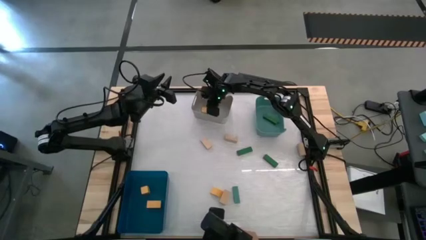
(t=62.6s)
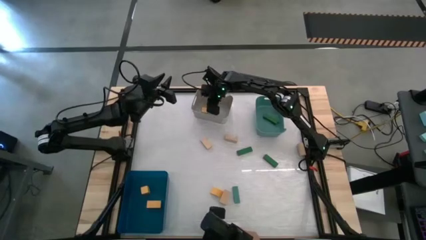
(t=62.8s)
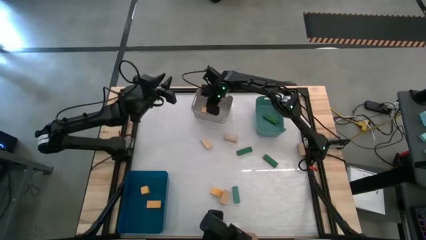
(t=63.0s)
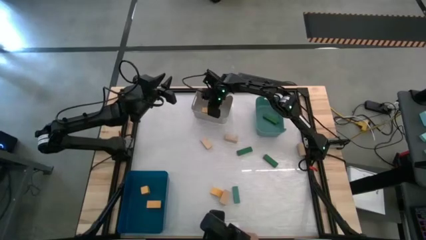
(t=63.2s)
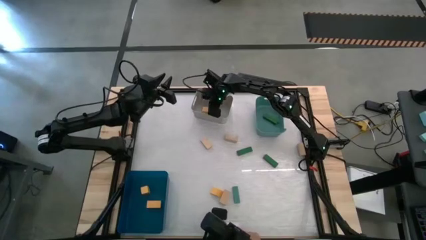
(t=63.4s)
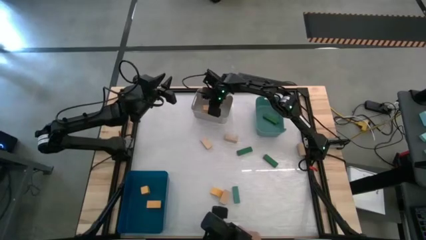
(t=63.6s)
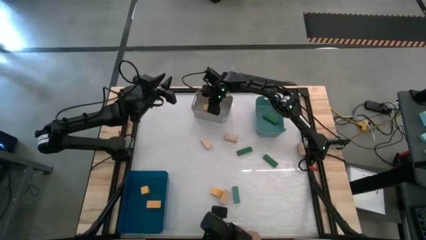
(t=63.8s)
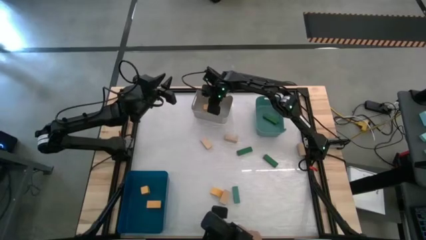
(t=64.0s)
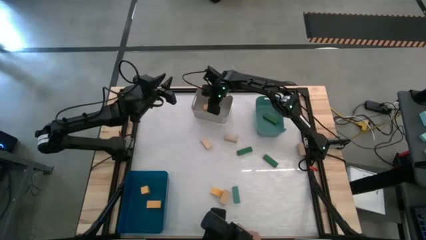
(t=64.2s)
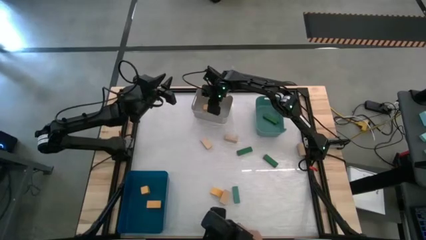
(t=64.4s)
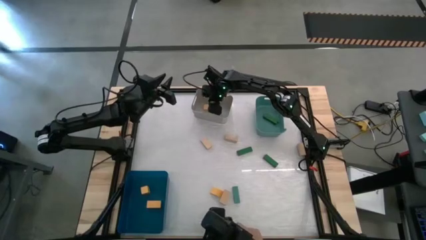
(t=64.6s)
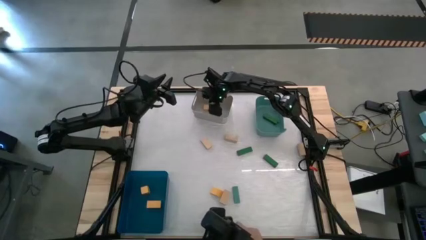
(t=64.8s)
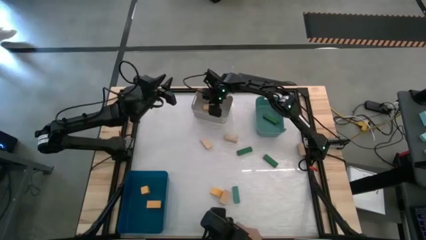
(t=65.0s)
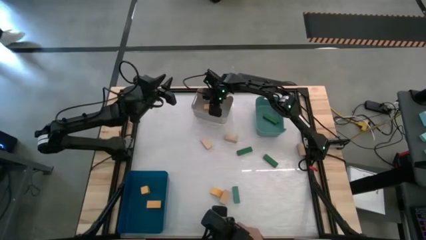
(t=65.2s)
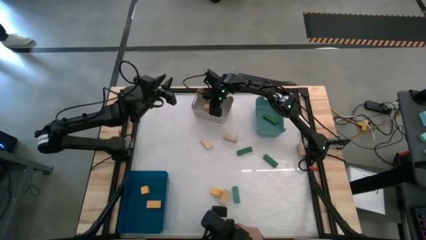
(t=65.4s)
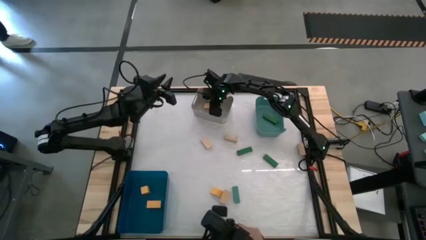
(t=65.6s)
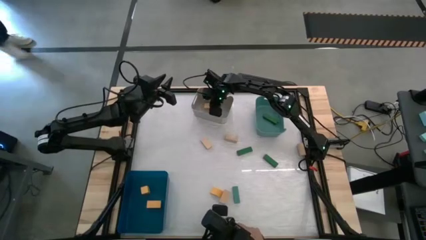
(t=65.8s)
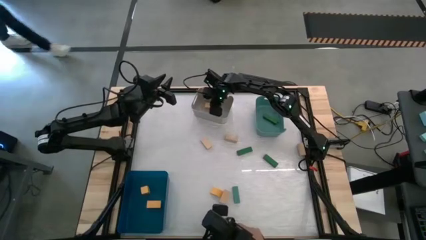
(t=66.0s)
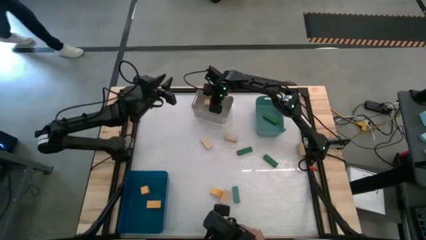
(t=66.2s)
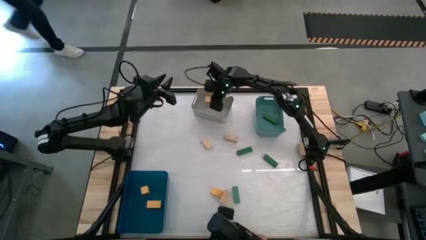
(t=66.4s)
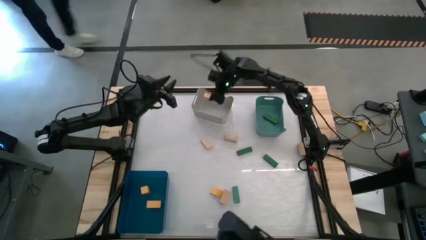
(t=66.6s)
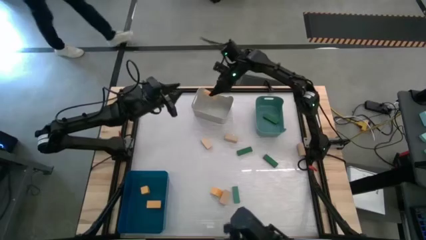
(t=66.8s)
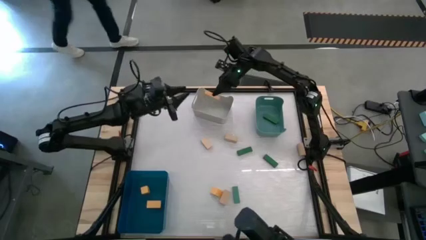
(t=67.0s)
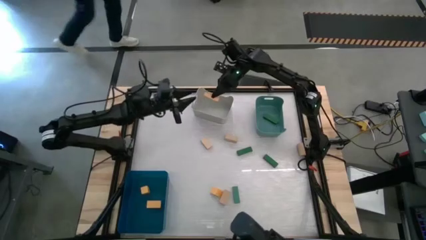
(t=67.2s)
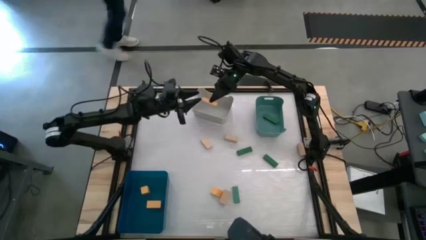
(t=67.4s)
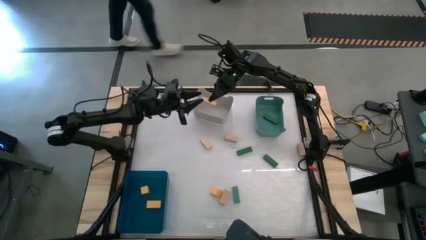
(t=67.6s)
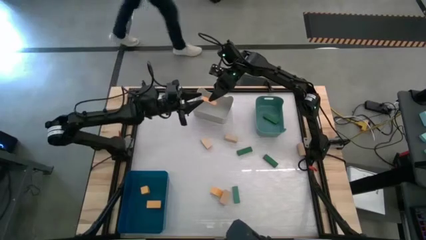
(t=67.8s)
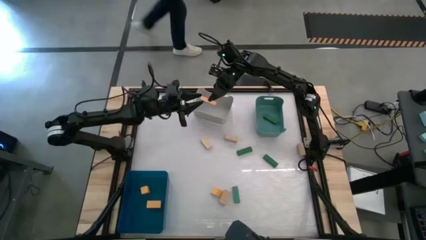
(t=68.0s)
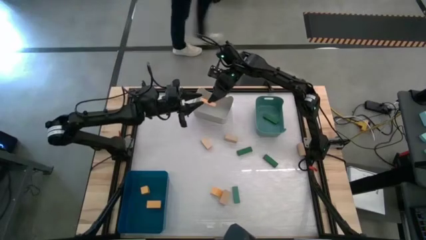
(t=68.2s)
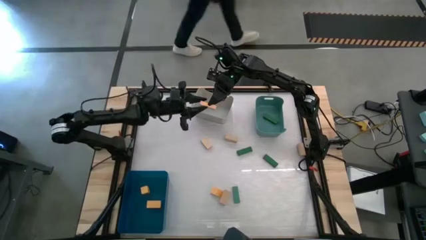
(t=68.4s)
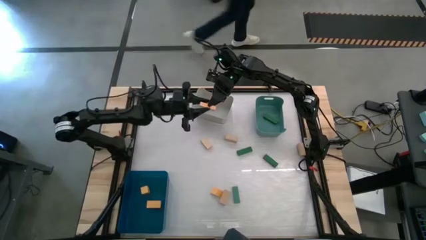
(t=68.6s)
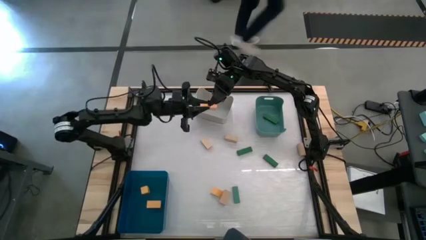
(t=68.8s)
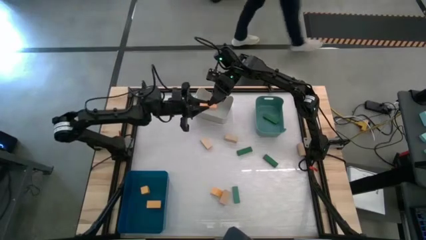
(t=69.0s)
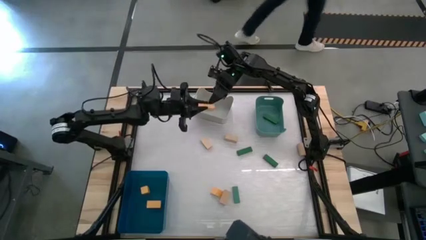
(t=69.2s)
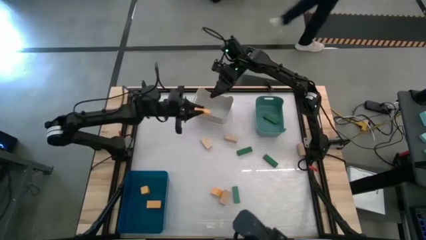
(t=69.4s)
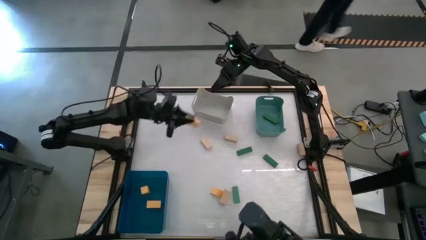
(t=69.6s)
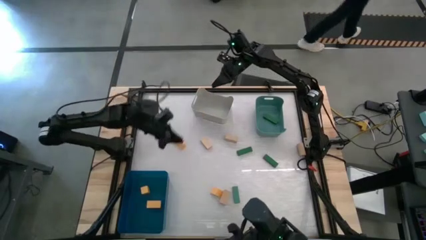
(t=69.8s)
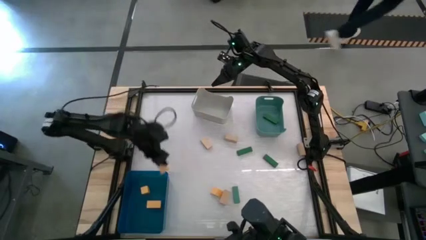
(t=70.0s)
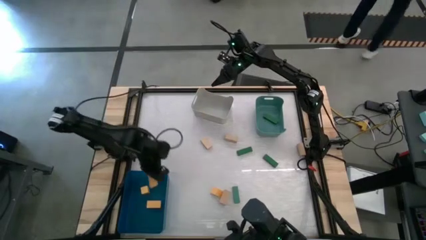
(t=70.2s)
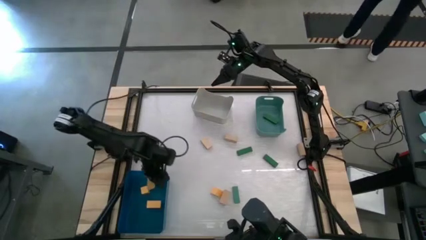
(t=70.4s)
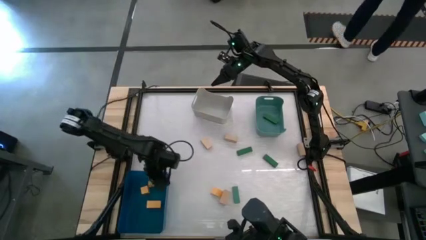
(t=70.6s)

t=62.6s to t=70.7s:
Task: Sort & place blocks by color
Put the yellow block into the blue bin

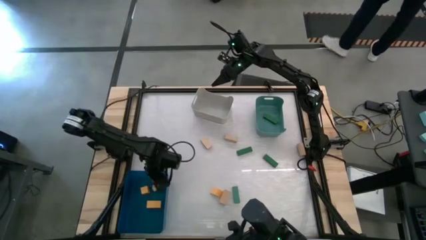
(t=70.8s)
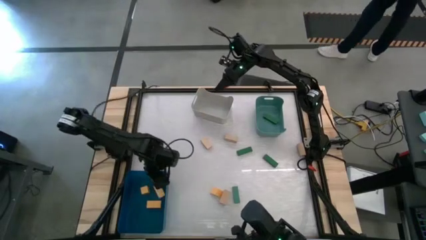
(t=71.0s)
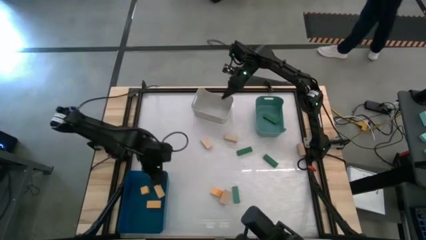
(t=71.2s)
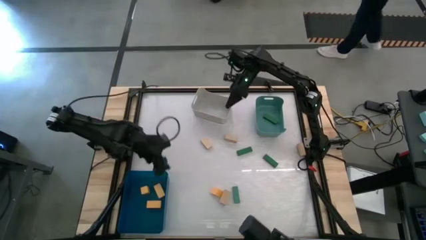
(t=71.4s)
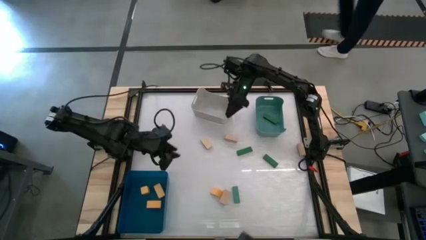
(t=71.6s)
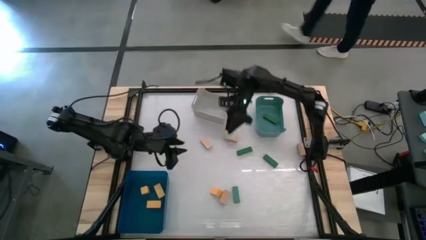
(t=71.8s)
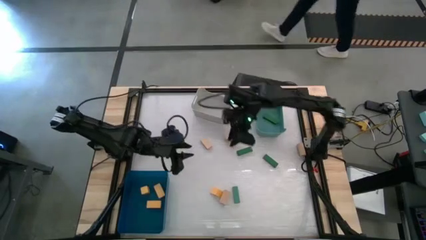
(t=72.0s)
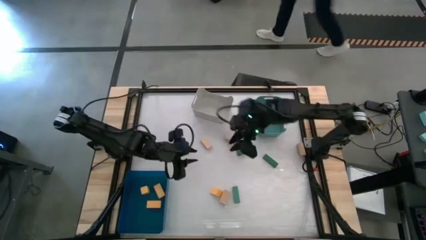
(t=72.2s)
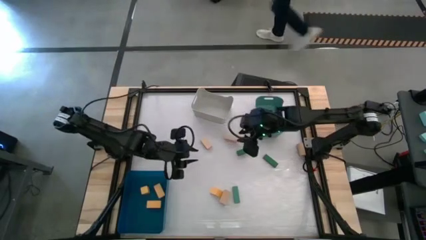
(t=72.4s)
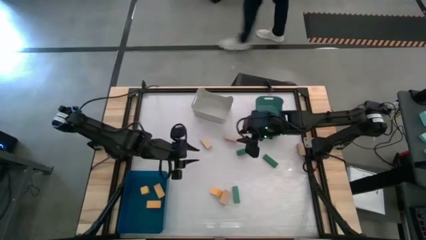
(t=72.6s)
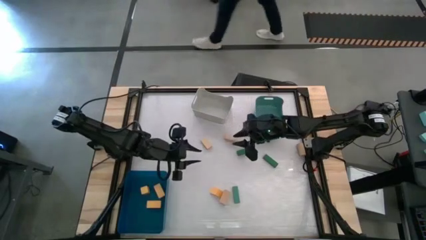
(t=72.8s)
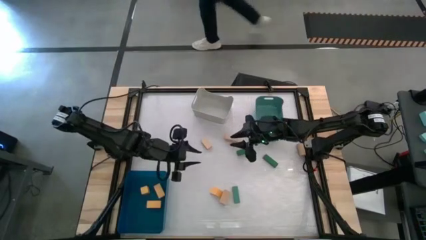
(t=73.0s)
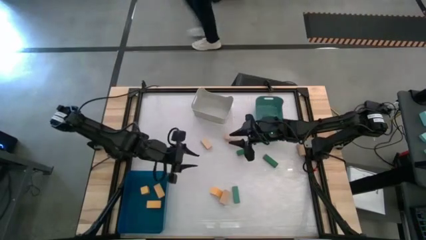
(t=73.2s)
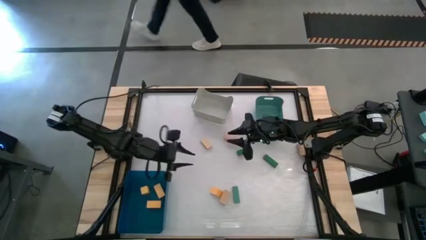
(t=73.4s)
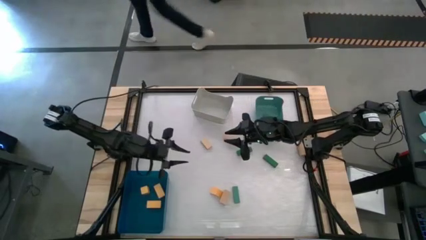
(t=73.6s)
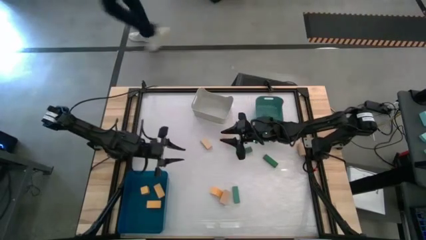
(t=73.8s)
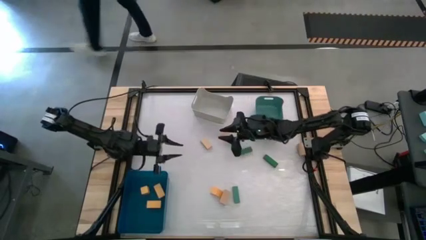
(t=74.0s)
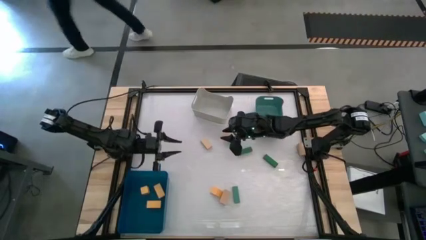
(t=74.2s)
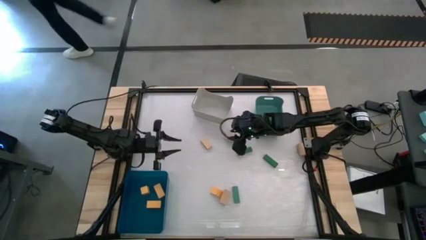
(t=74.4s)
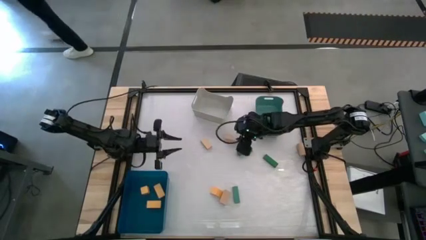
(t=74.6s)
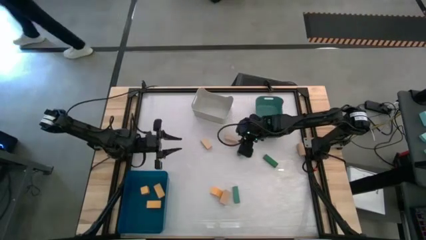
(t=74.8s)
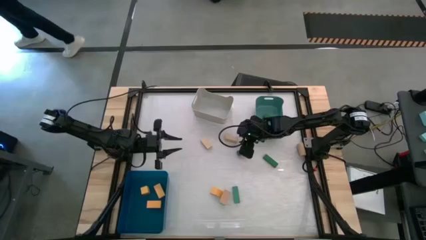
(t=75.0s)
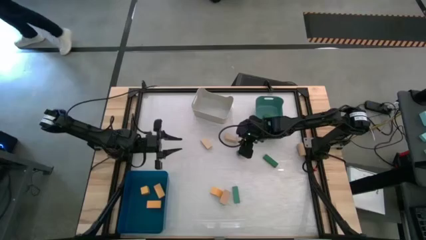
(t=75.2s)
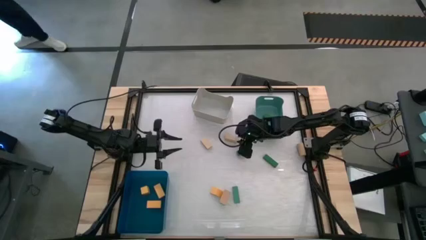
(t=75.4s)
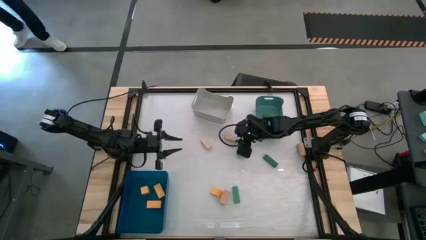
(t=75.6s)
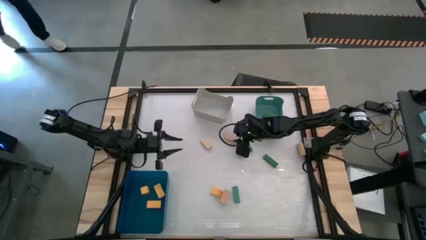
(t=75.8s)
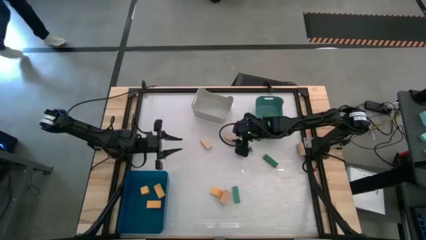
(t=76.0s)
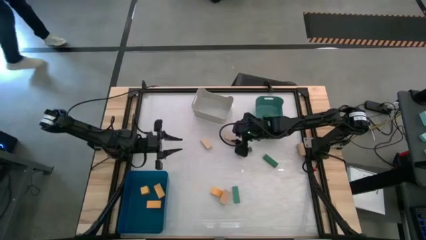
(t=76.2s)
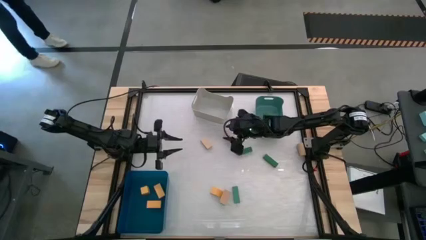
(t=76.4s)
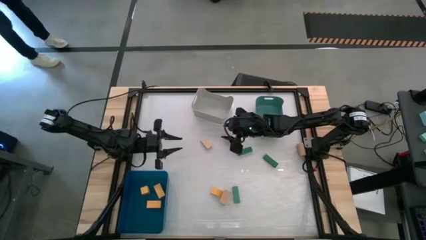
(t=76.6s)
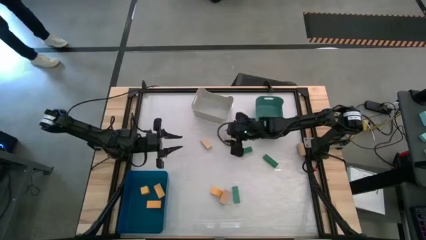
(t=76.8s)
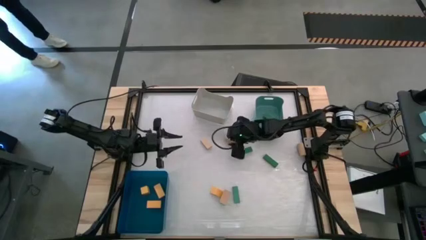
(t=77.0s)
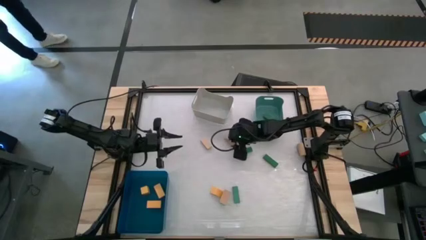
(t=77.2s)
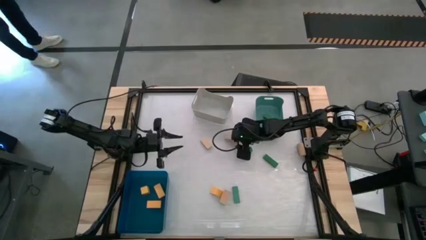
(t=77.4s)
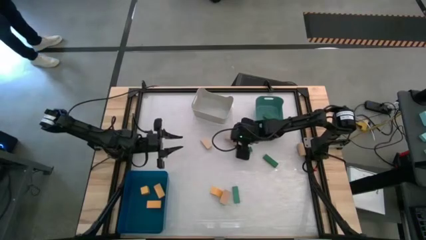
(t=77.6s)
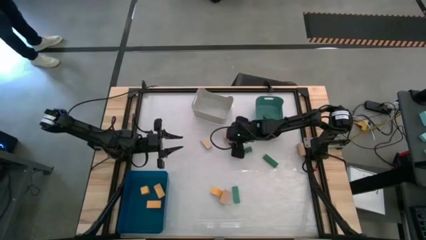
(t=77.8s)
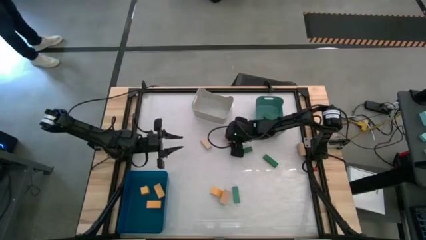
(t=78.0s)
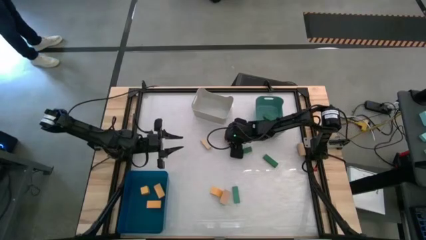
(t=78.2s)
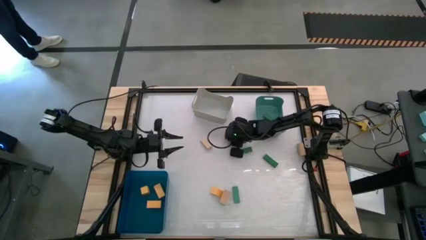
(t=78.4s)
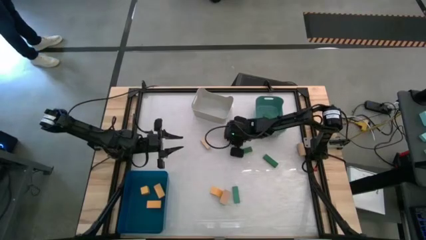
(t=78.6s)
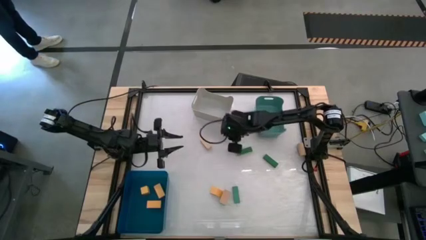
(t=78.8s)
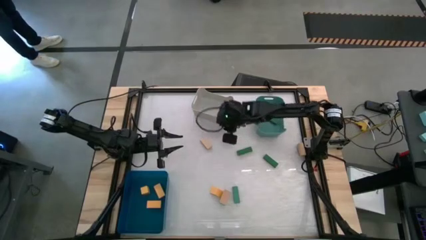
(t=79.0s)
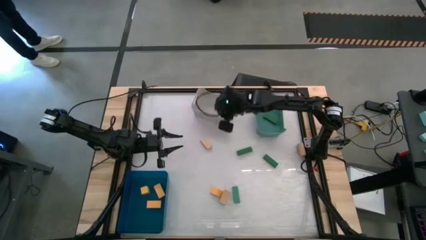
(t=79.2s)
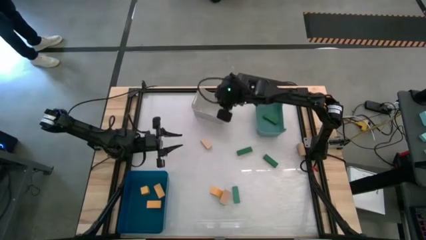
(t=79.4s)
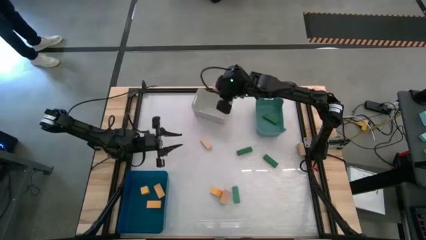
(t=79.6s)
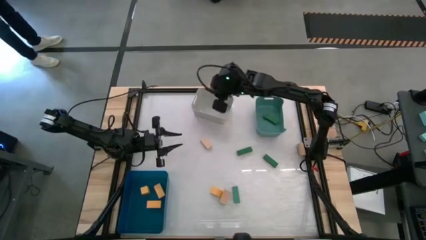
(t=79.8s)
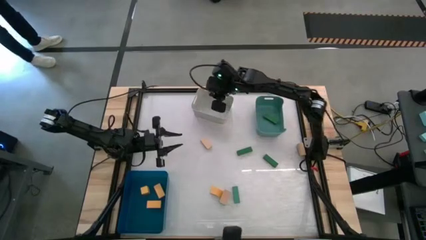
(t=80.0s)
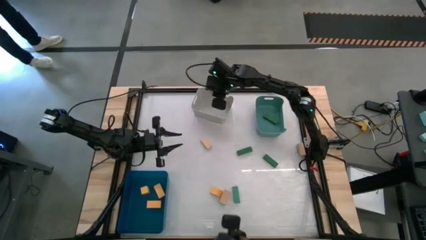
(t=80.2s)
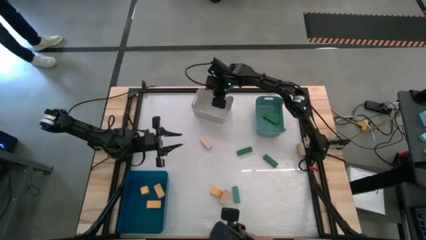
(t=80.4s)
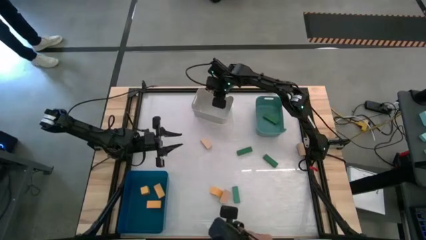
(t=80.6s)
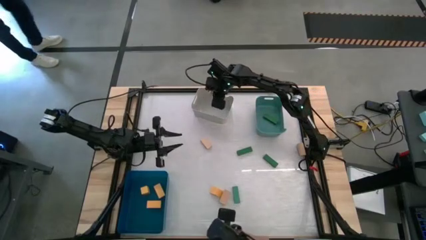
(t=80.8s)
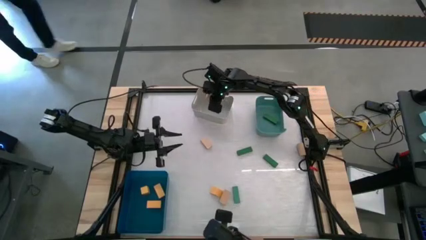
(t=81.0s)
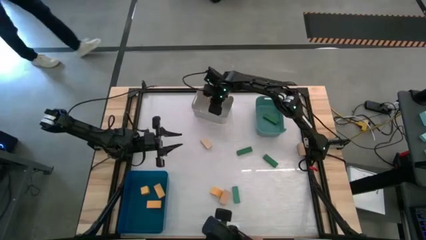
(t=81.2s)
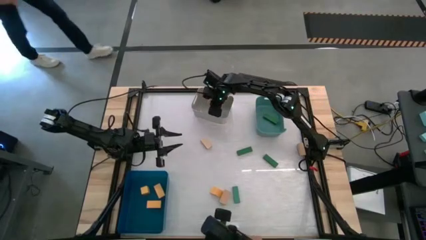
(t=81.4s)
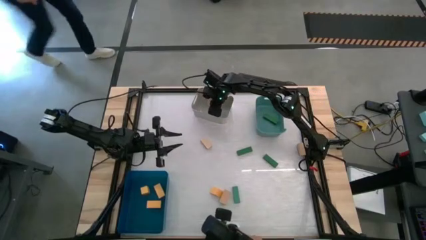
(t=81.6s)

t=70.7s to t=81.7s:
Put the brown block into the gray bin
